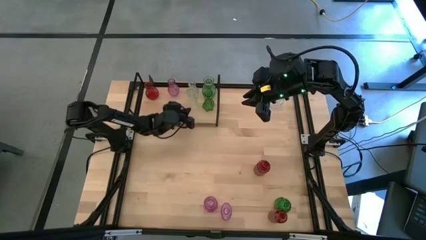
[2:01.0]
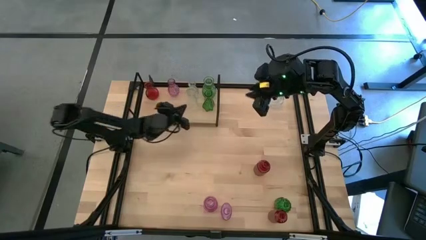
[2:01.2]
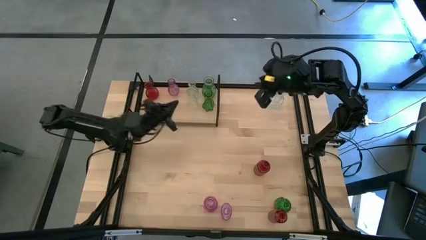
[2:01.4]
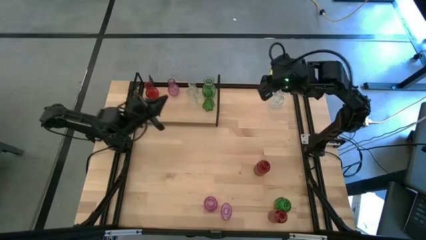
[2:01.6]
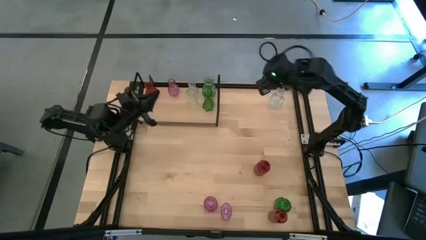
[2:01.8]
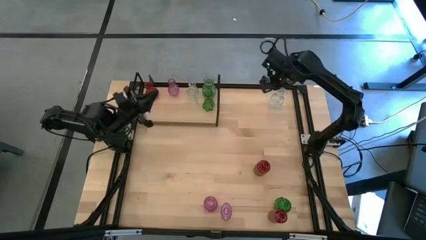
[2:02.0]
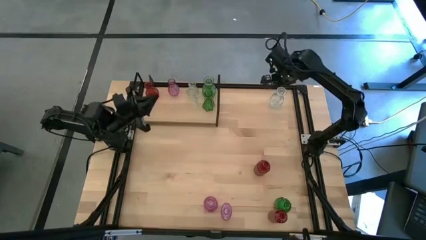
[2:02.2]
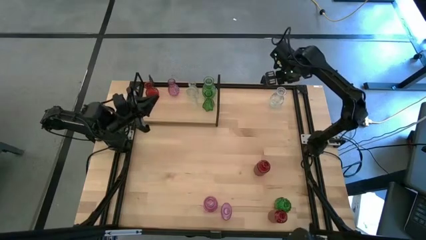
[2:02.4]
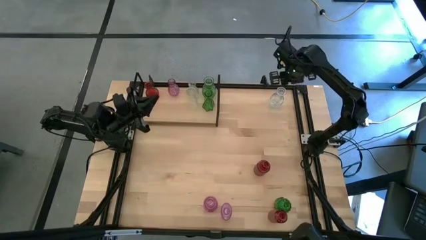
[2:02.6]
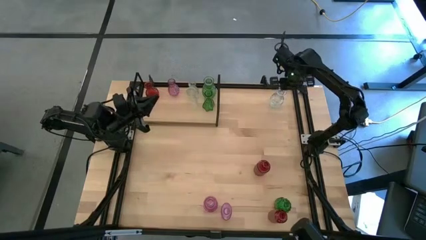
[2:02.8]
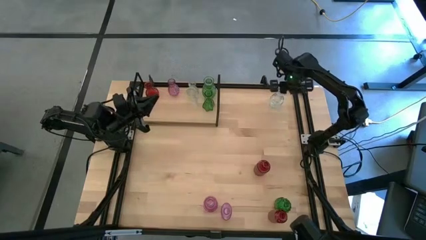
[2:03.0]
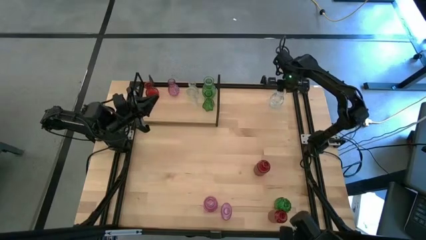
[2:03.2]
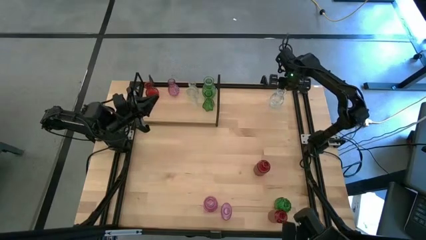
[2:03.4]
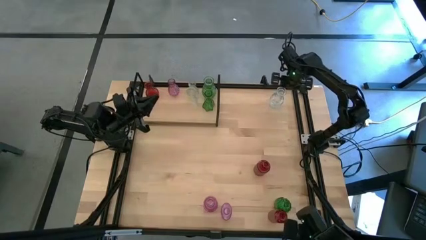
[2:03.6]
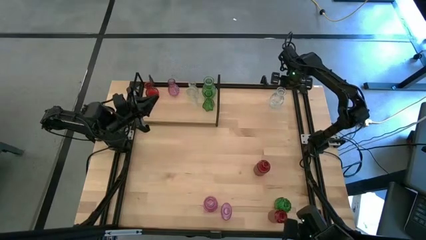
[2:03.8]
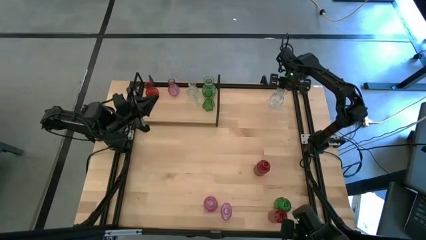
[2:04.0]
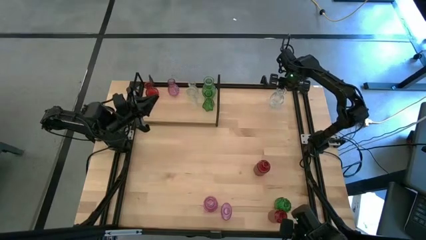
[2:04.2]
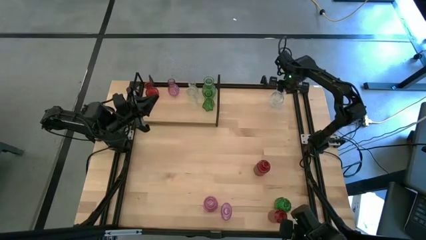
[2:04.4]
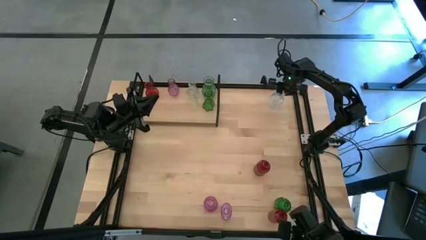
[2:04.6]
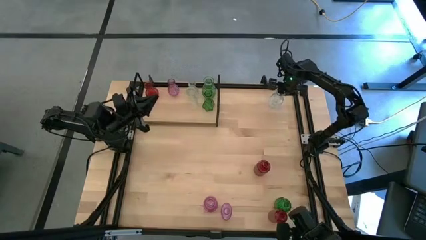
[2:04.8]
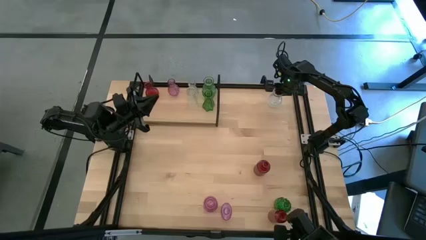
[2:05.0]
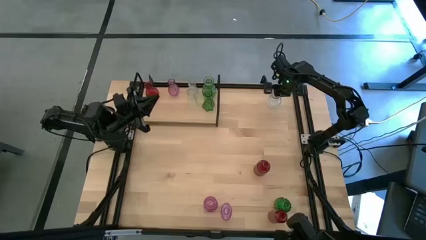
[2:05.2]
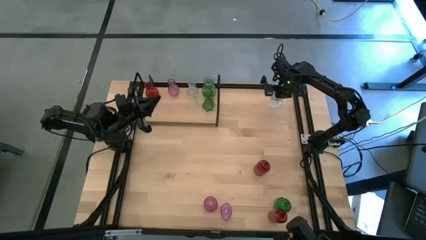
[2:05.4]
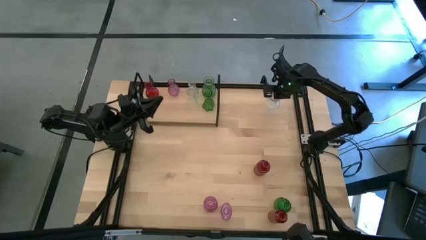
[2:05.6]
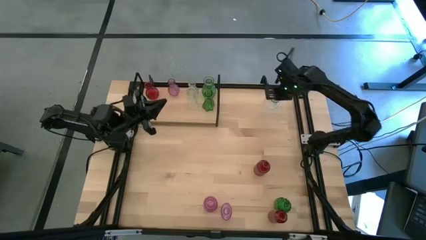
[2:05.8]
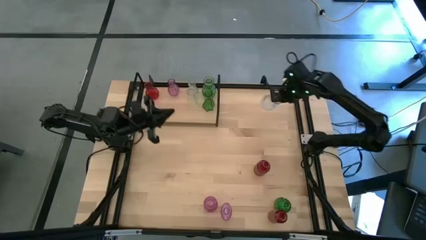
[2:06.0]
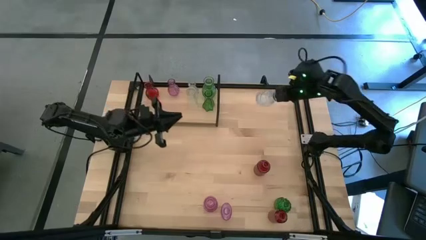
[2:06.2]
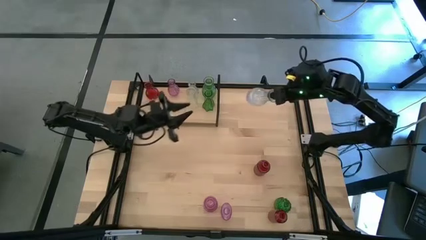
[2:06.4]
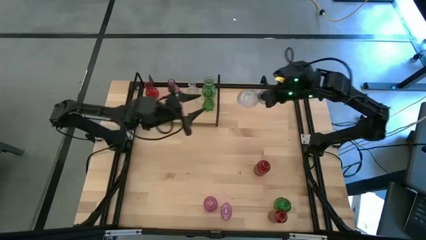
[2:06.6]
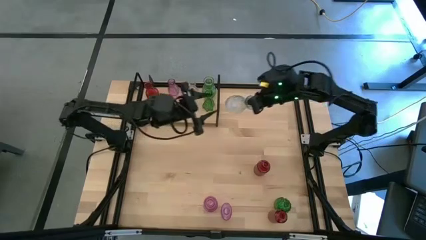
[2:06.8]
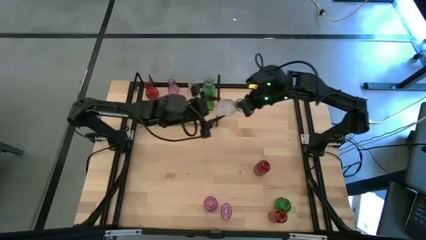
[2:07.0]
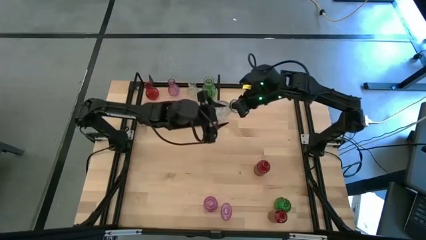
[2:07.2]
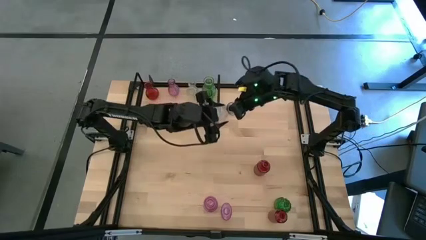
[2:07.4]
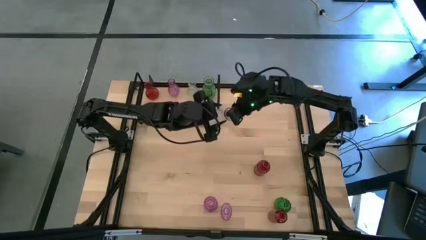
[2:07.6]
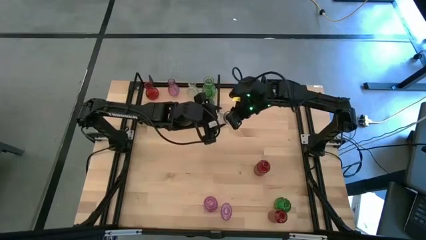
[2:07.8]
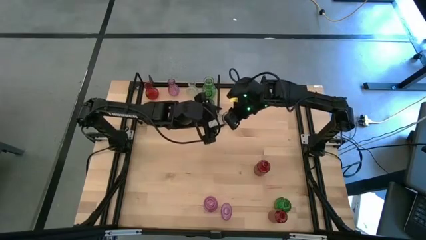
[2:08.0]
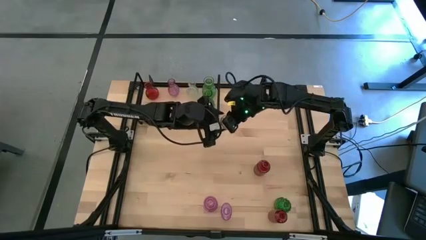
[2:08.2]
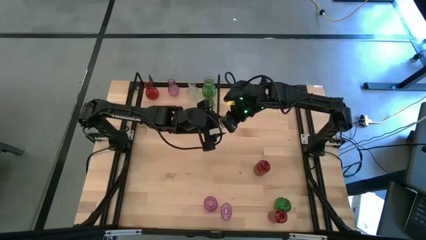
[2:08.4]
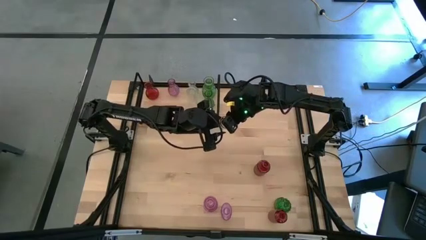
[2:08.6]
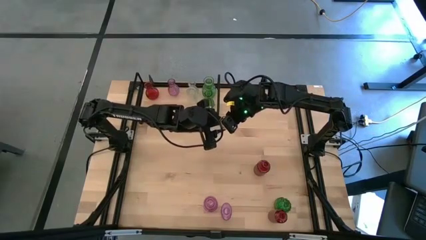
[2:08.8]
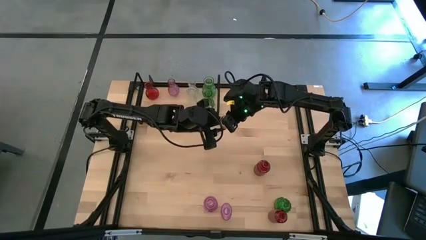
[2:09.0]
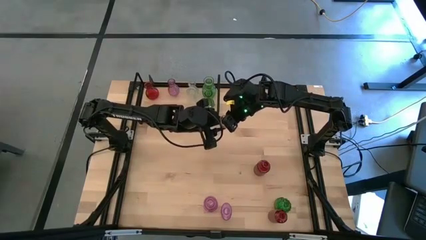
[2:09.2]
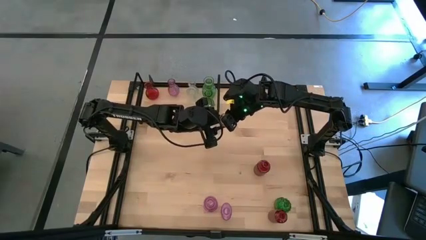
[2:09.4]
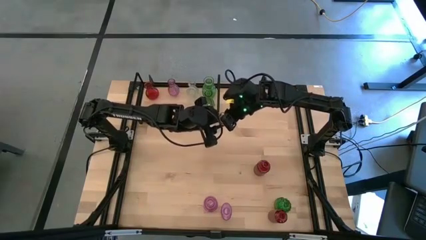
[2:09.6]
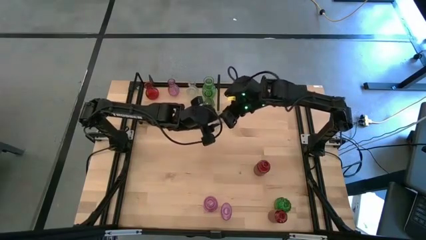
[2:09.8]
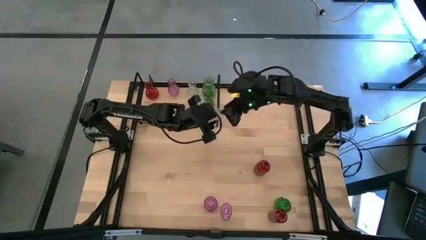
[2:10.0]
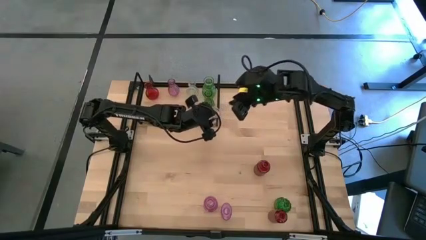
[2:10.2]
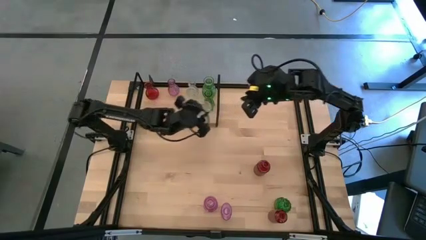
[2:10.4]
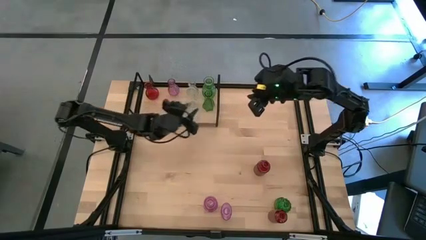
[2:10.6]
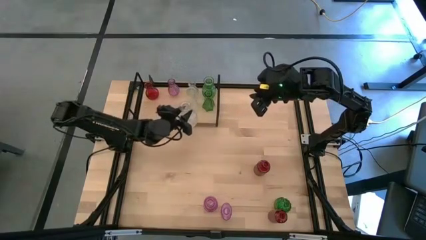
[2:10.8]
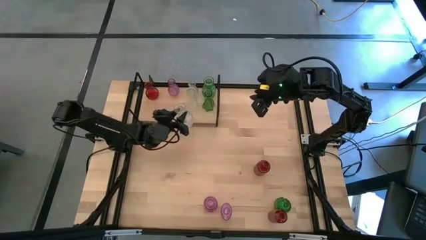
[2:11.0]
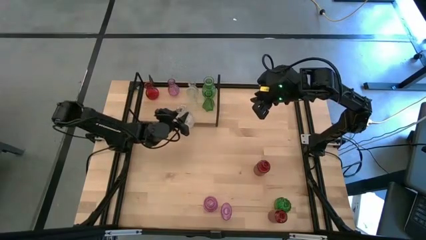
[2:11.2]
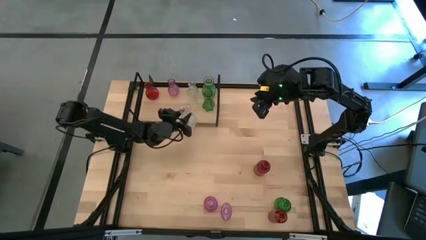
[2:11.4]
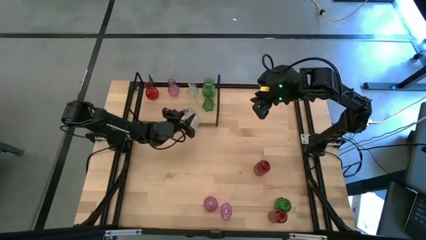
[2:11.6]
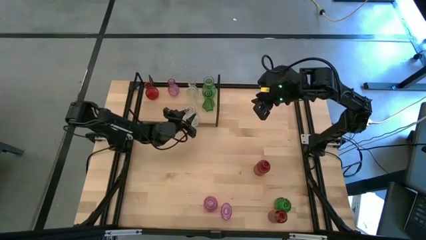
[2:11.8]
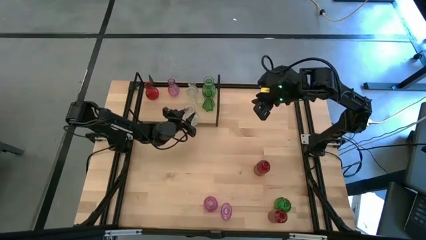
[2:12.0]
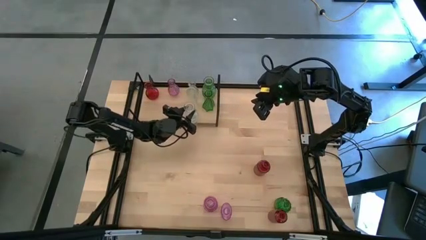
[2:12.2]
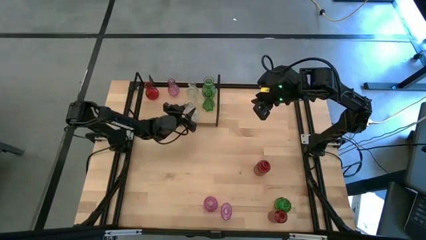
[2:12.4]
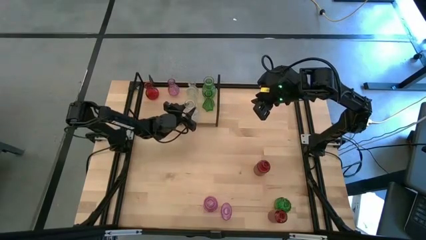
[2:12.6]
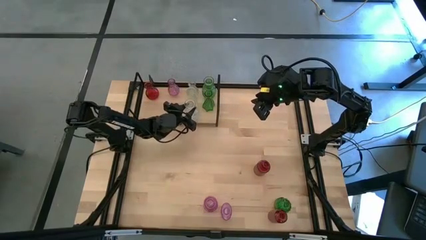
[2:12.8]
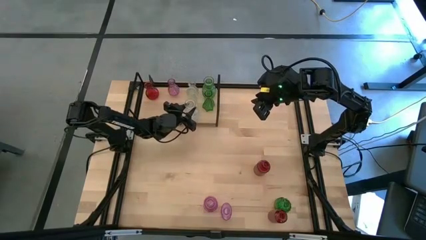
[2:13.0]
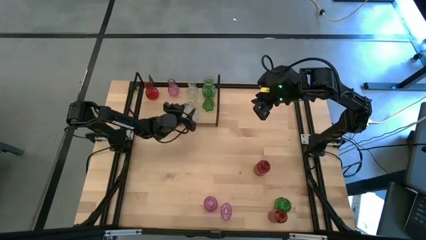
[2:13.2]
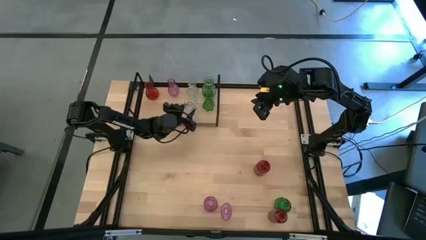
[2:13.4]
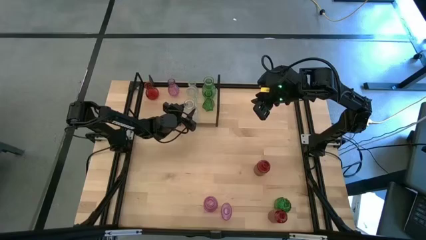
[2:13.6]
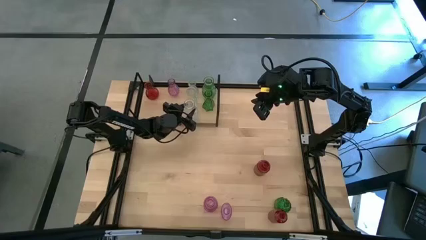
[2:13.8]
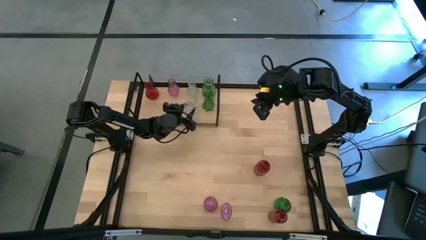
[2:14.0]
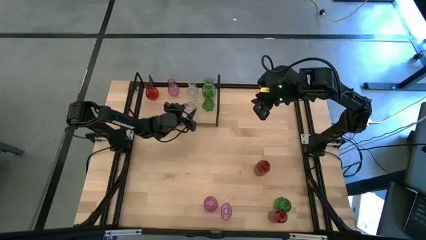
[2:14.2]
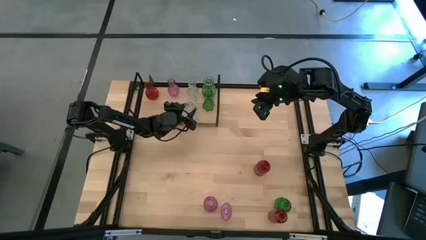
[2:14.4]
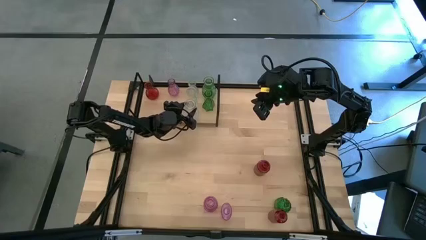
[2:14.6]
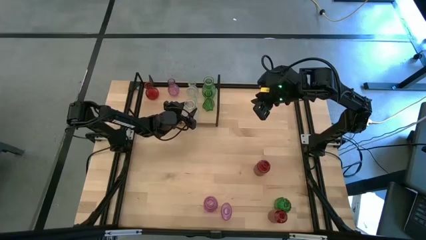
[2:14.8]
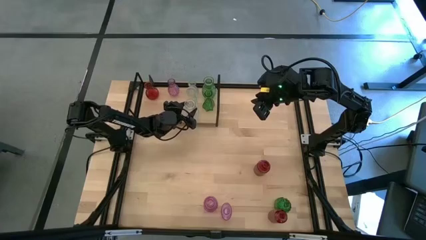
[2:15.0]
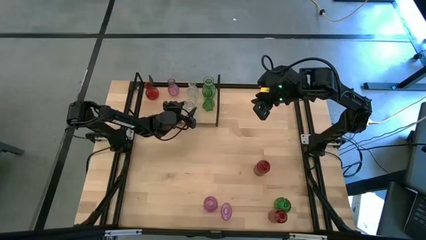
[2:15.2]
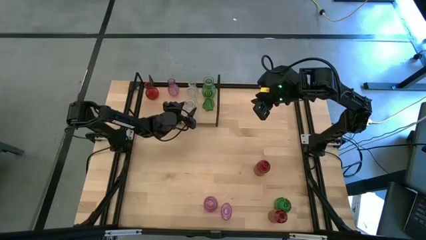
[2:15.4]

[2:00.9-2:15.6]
Task: sort vases onto shelf
Put the transparent vase on the shelf aligned with the other transparent vases

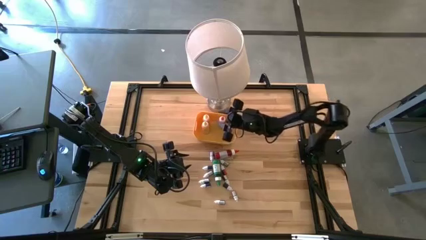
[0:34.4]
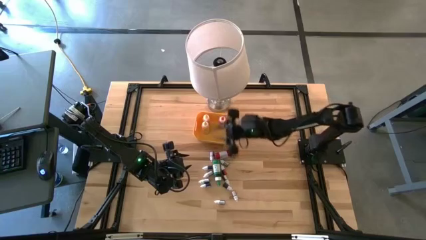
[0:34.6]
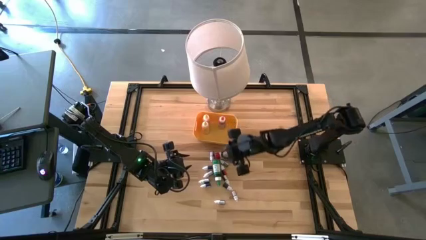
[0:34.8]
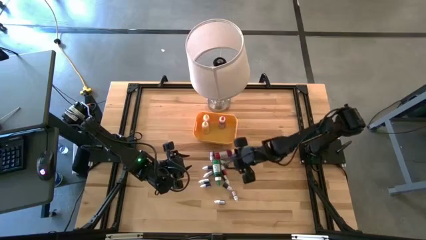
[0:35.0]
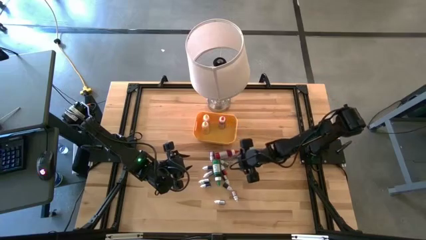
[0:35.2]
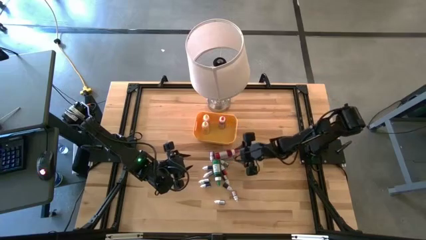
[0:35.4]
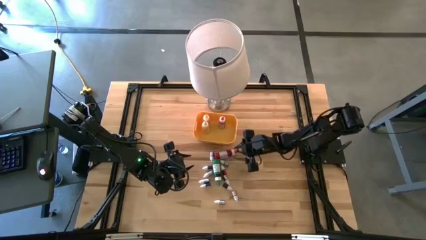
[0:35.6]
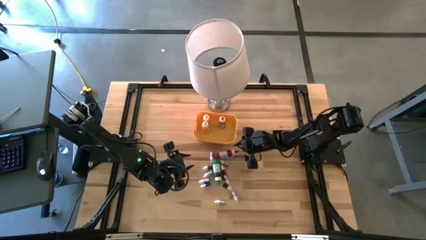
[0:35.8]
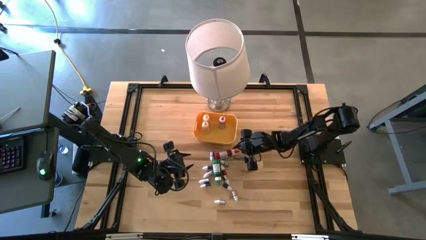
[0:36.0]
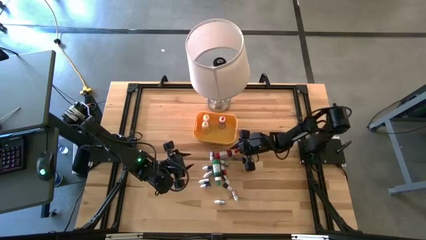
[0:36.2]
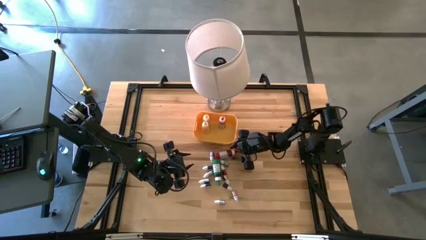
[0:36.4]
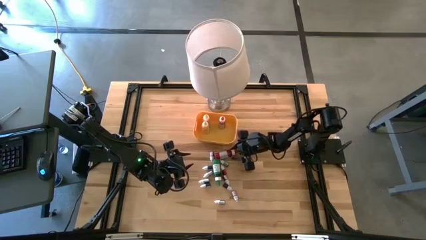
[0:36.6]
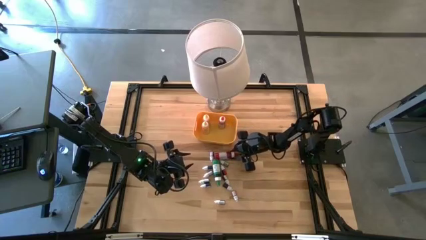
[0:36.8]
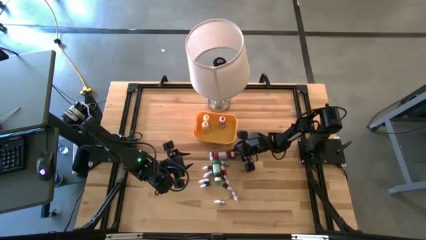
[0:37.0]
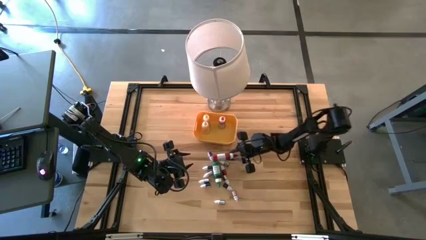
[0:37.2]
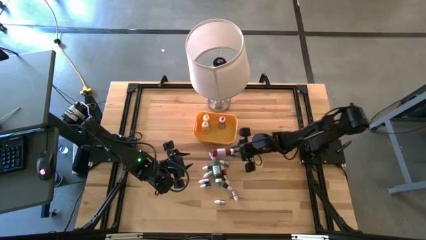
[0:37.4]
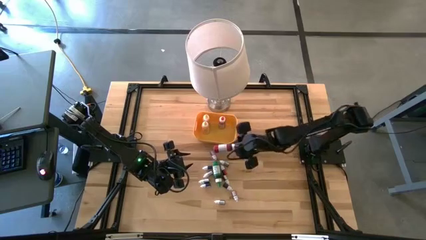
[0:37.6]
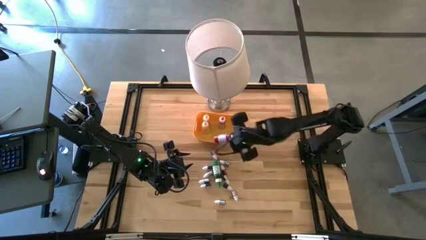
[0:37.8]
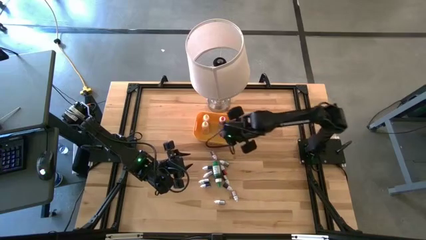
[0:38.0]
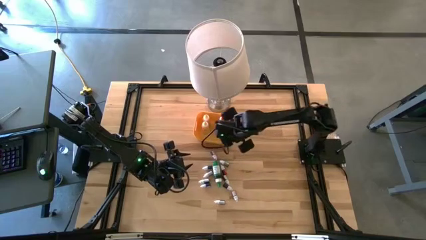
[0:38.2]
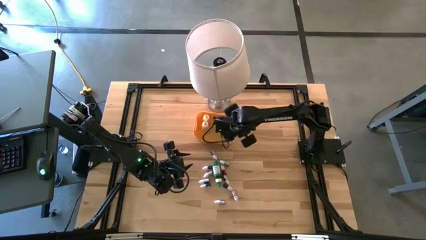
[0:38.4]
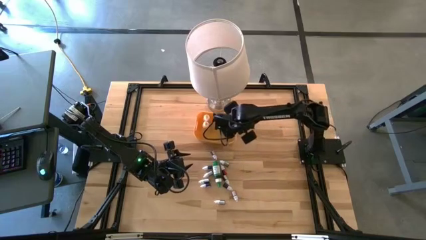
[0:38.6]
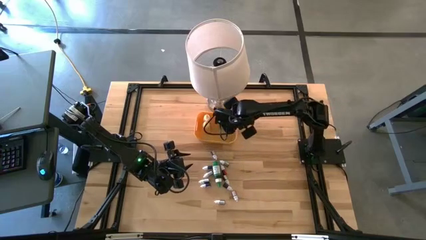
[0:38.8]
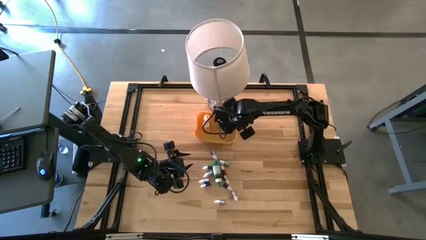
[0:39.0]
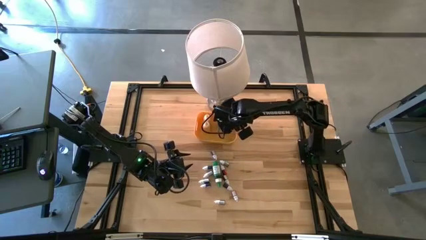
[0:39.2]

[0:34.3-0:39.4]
Task: Pick & Place food coloring
Put the red food coloring bottle into the yellow bin
